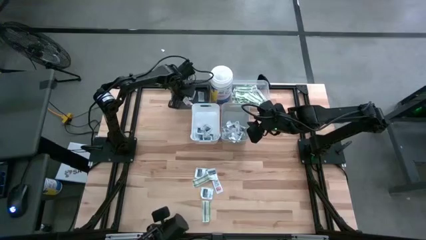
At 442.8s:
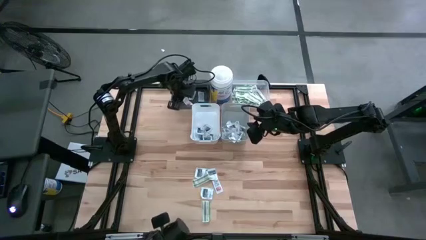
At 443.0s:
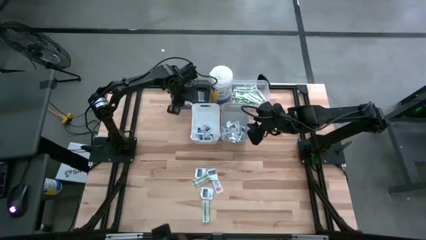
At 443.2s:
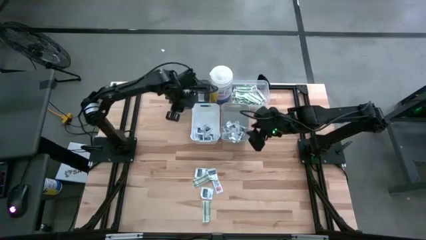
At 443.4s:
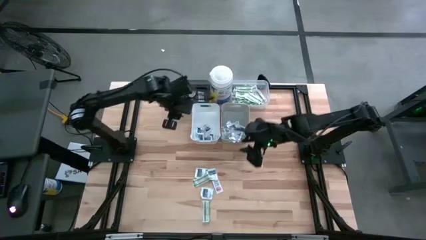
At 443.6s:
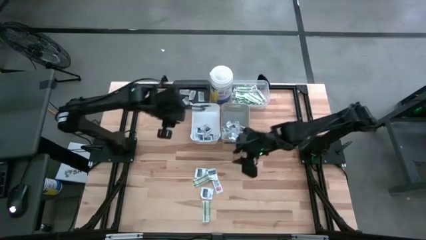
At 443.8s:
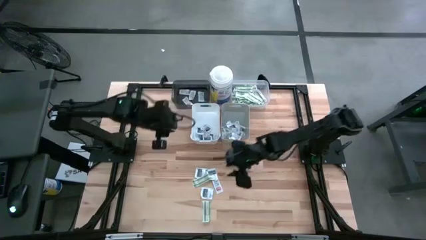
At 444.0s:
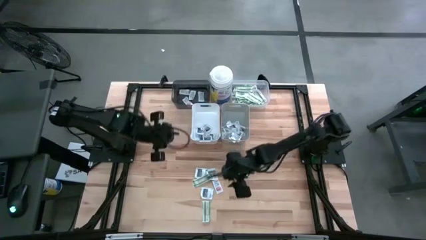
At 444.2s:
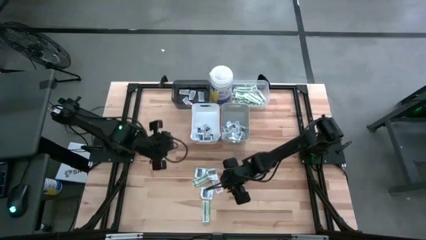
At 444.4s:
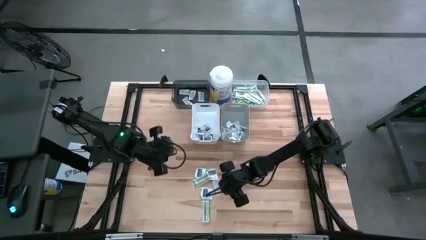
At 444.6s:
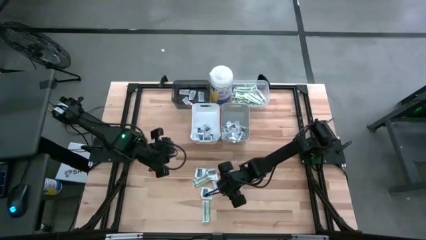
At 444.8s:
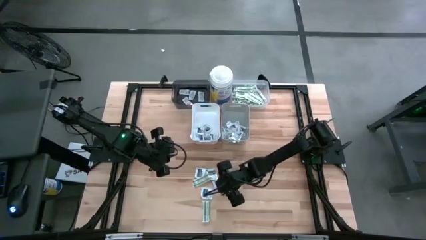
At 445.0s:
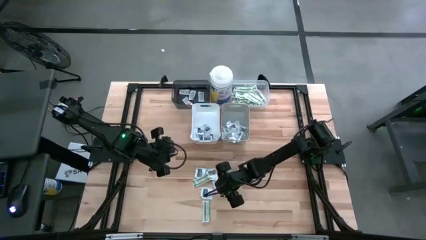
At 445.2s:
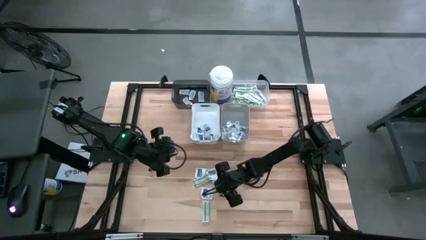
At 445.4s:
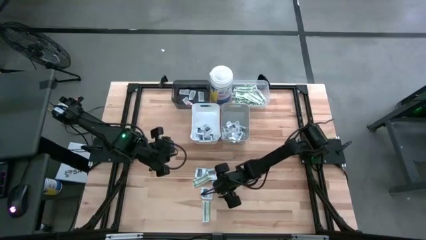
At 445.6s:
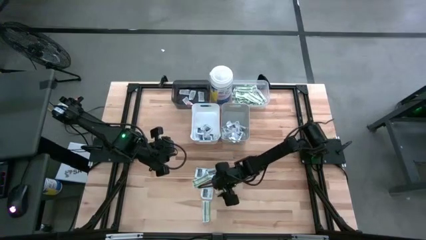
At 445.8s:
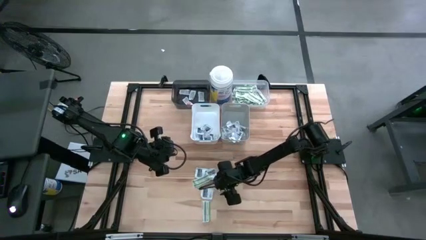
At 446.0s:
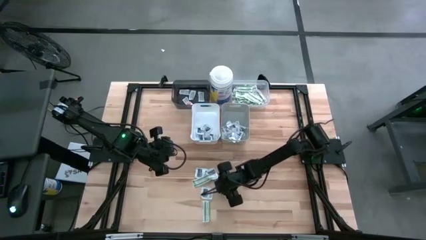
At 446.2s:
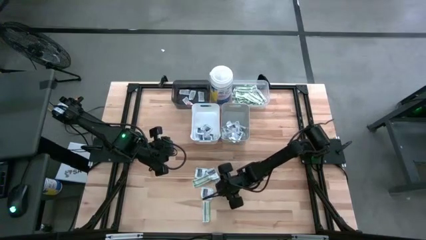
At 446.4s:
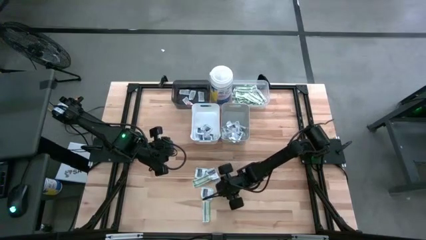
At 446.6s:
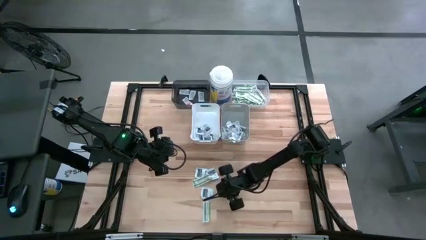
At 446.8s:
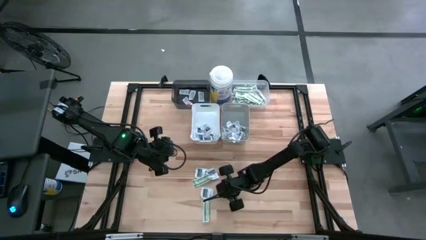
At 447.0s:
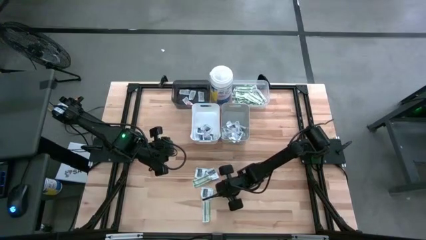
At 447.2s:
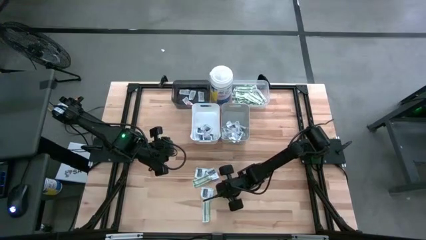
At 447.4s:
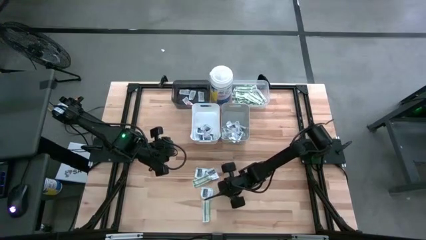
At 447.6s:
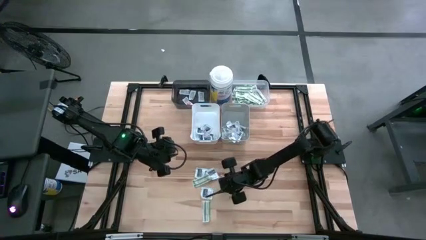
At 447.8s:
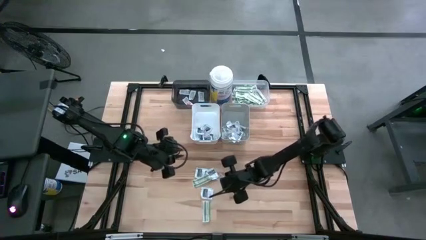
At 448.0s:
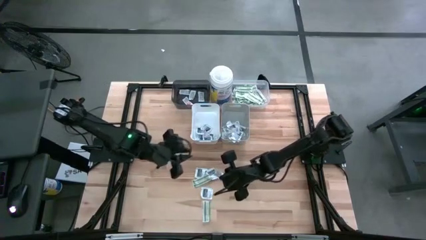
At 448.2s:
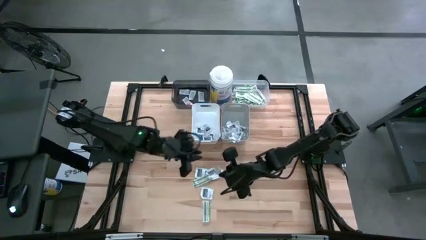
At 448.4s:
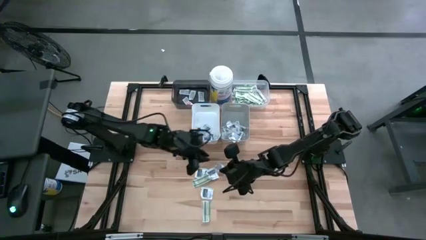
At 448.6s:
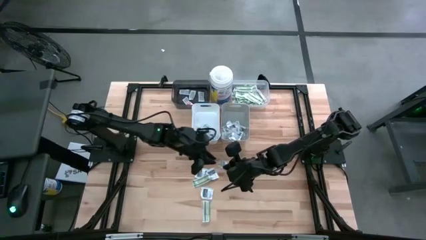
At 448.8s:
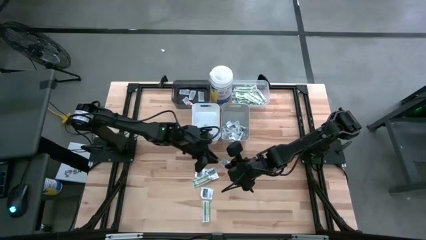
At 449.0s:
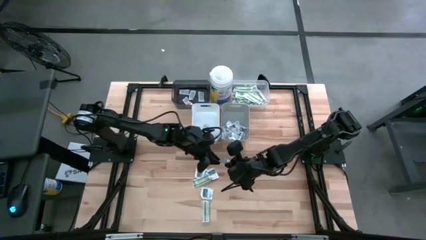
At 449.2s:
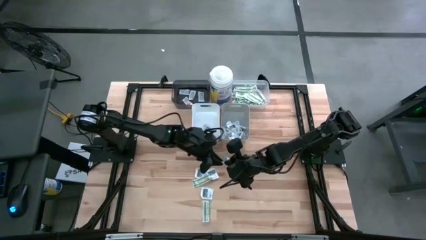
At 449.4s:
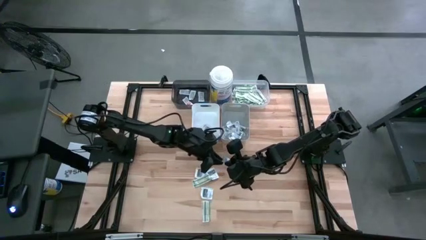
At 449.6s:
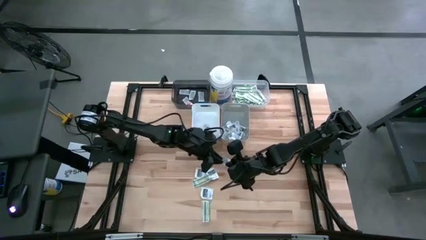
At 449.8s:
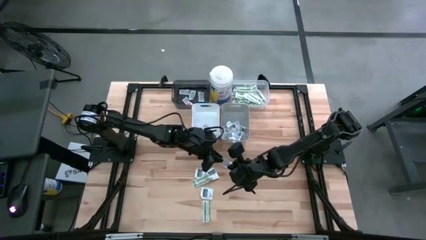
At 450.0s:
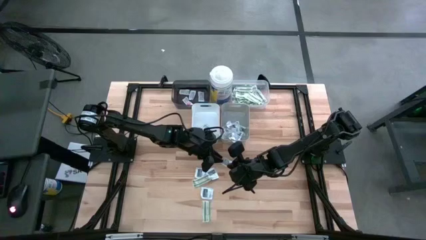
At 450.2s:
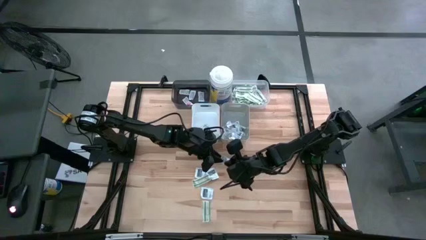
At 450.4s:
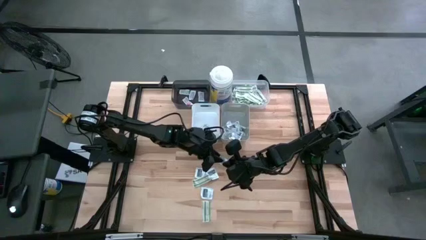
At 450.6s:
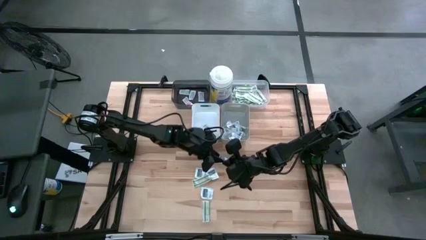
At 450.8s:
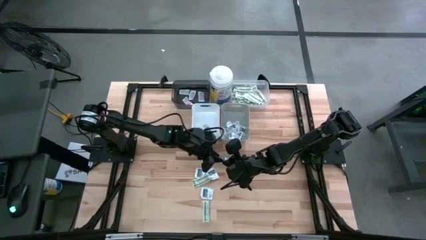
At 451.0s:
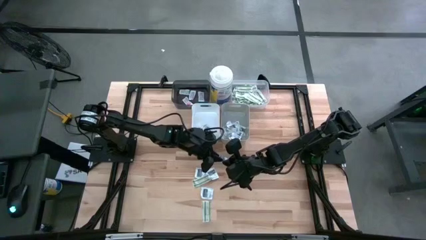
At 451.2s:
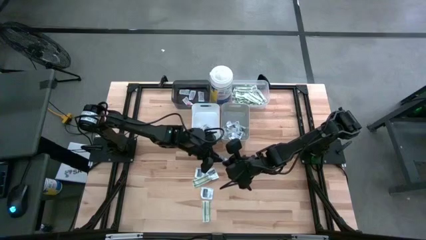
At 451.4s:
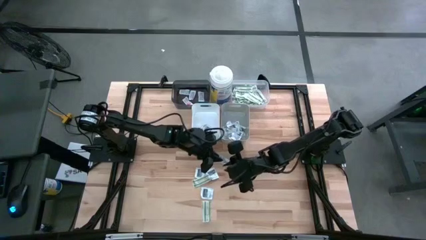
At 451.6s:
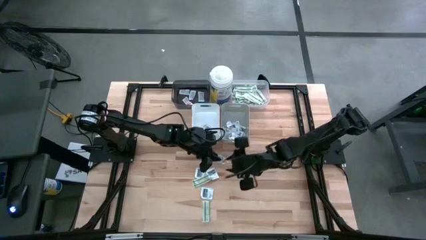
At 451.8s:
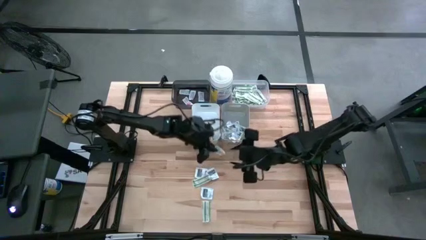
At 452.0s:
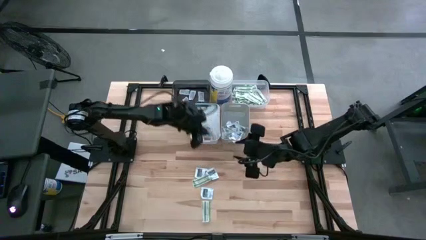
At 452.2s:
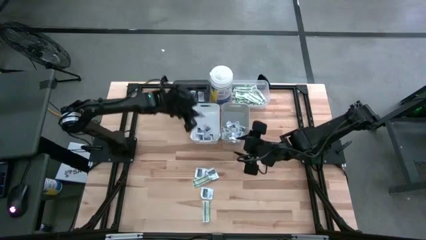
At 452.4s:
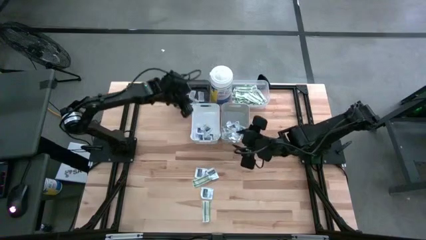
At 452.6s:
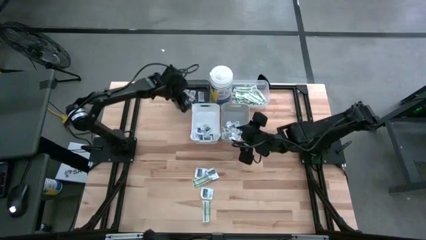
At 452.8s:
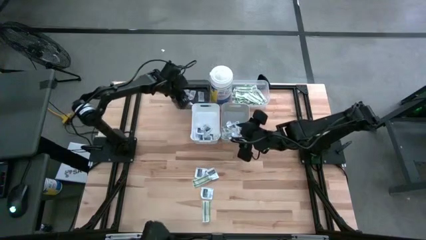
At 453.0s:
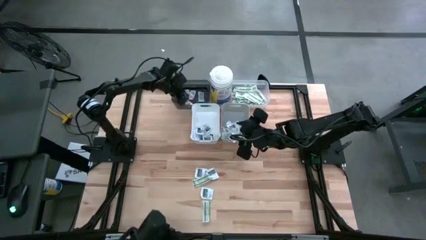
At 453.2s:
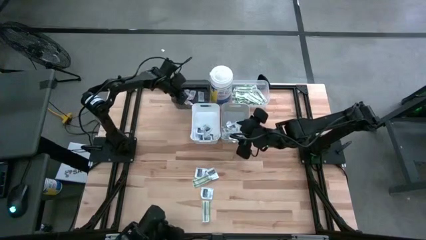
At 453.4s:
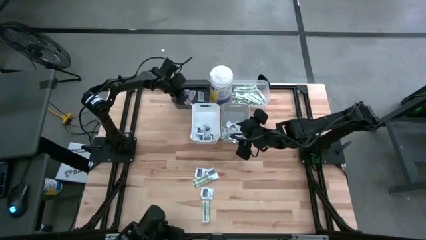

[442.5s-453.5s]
Task: Pick & Place First Aid Supplies
Put the ointment into the black transparent bin

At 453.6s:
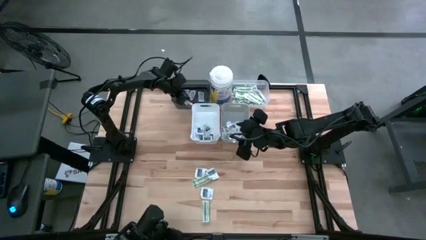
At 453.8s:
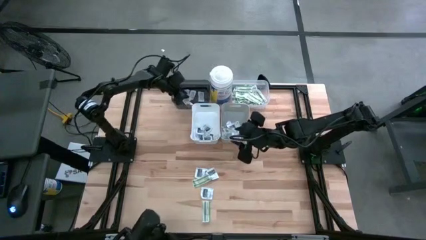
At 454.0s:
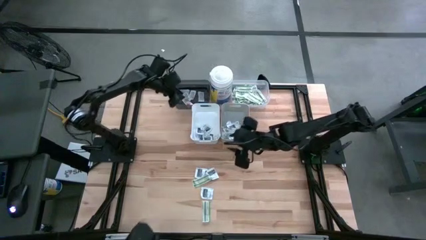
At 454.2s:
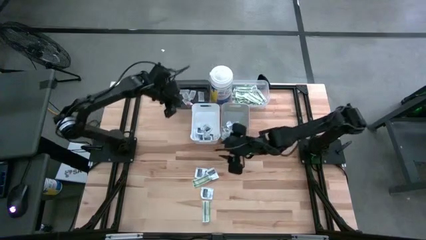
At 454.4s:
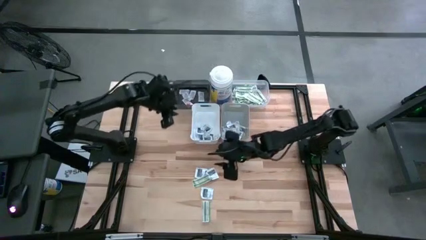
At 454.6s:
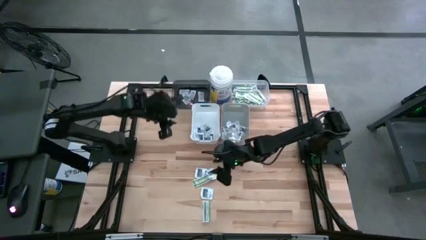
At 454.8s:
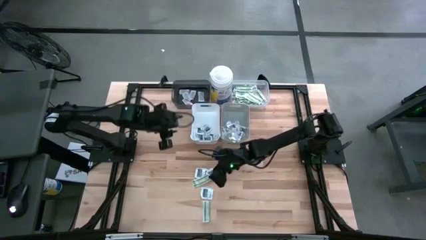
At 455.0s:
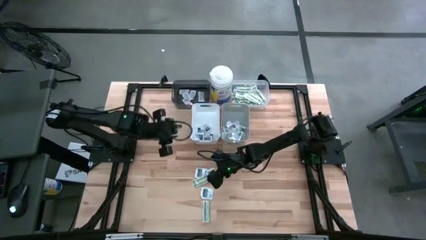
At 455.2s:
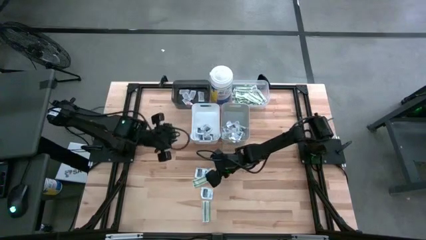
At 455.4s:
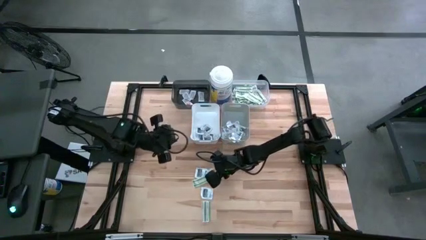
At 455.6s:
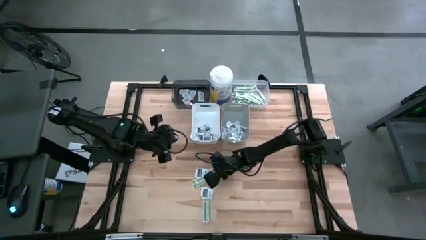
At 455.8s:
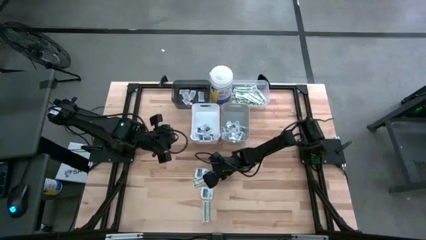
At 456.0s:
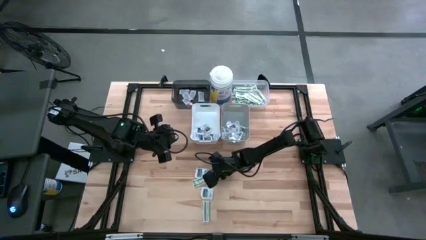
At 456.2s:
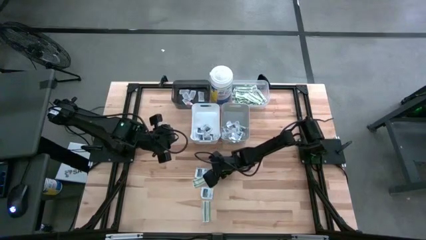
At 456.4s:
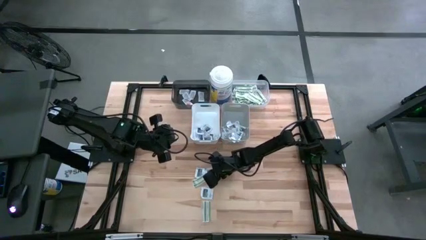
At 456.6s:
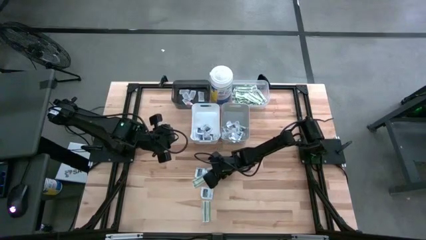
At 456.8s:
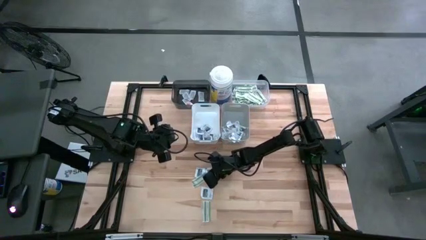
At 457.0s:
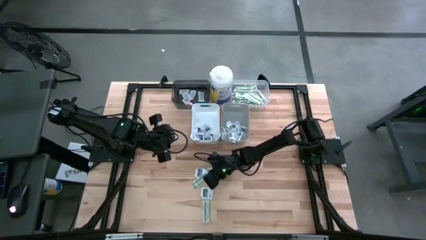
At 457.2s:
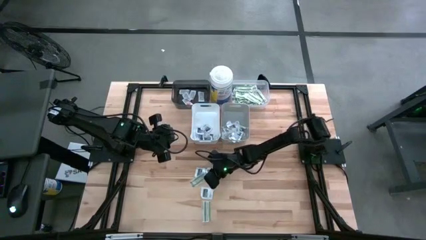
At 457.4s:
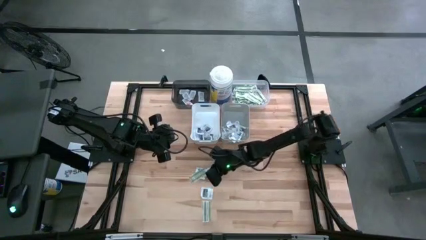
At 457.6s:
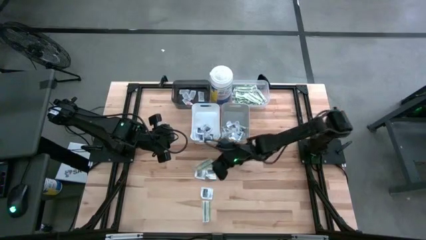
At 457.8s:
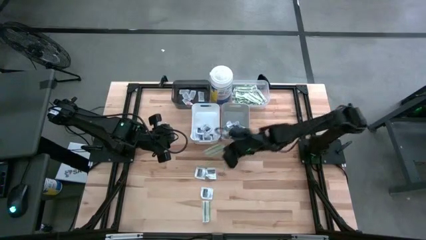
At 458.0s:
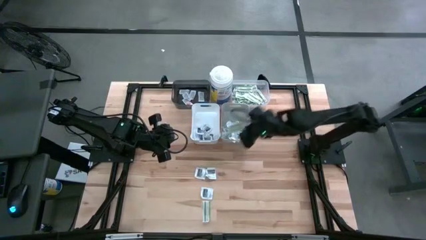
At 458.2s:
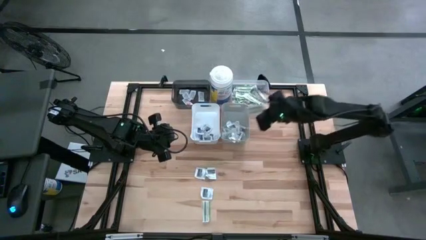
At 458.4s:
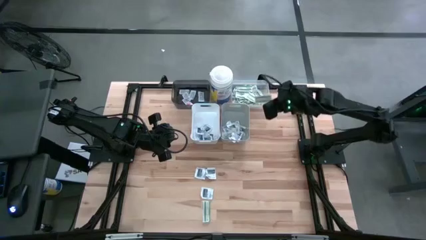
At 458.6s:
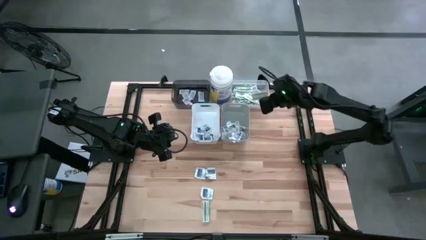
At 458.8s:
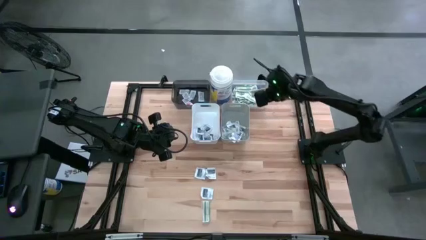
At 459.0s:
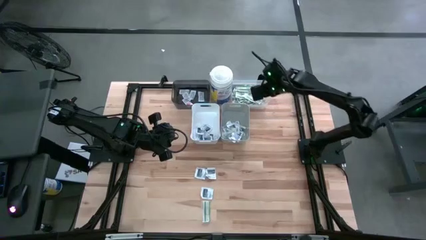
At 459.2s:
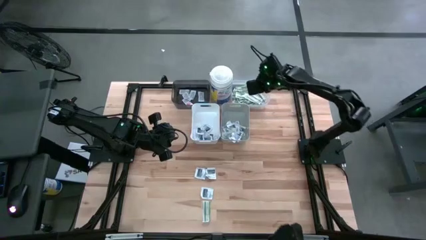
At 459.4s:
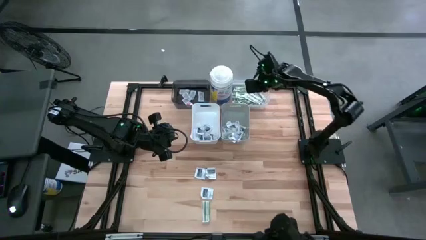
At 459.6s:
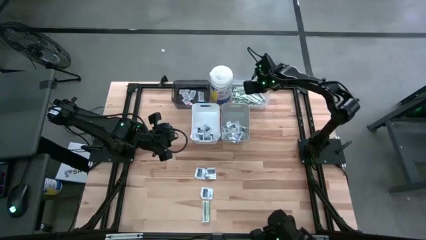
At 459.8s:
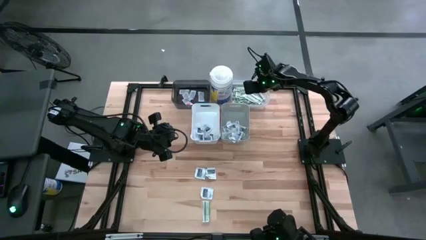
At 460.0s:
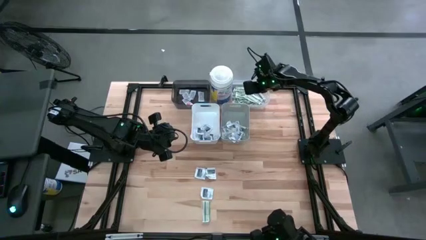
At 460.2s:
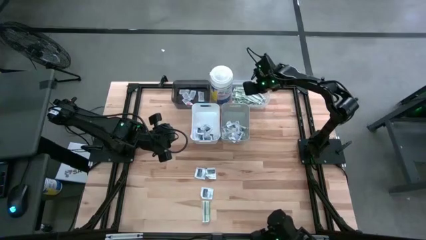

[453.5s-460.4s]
Put the band aid into the transparent bin
